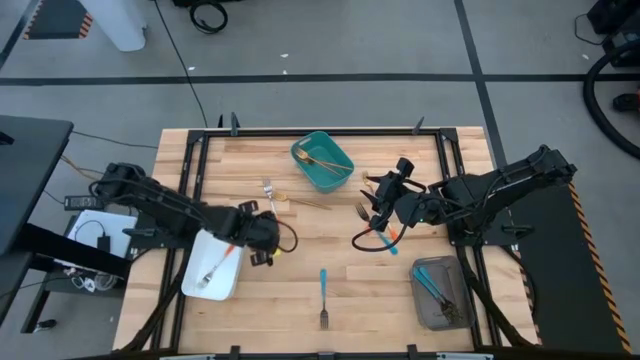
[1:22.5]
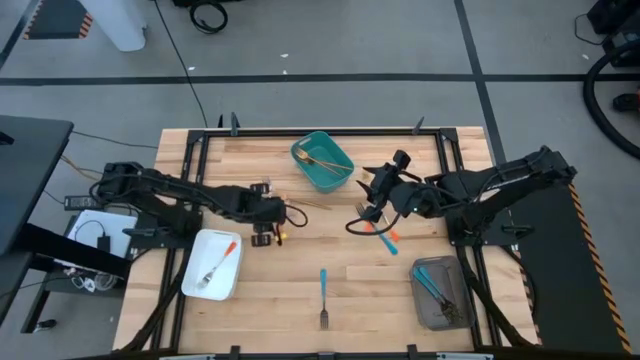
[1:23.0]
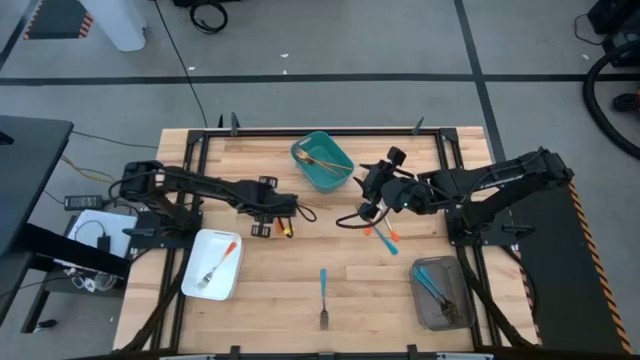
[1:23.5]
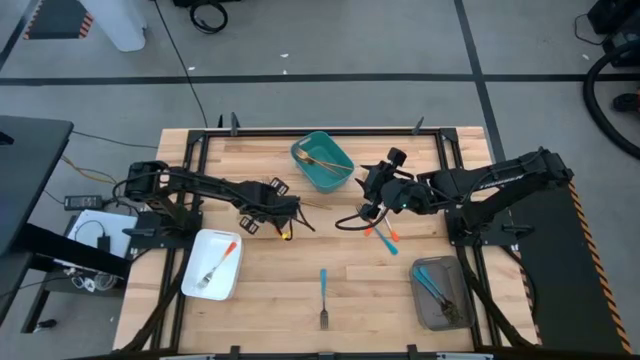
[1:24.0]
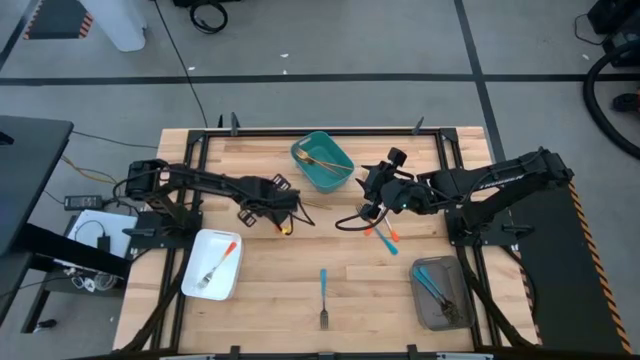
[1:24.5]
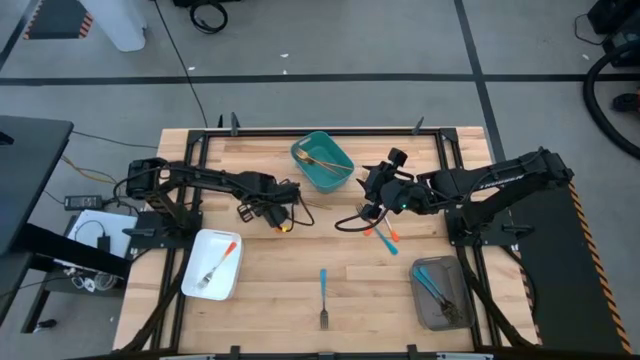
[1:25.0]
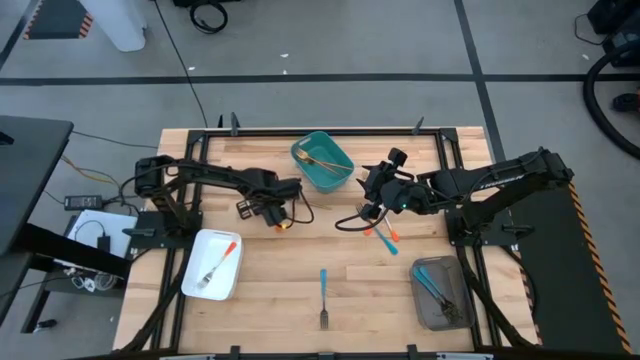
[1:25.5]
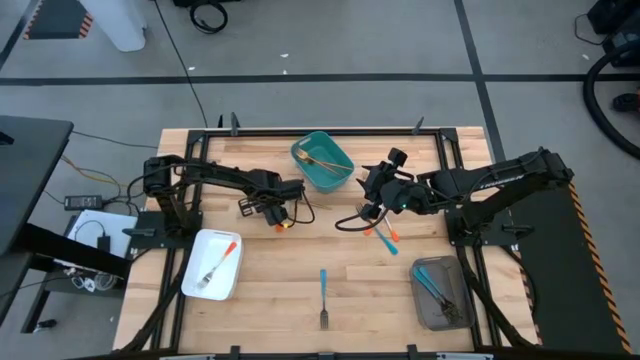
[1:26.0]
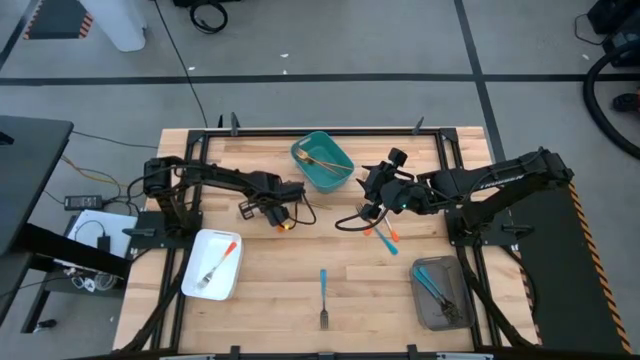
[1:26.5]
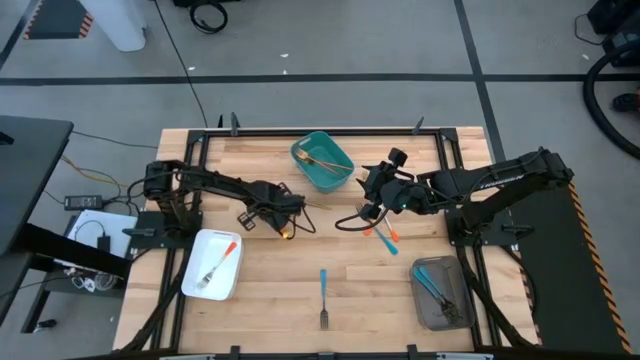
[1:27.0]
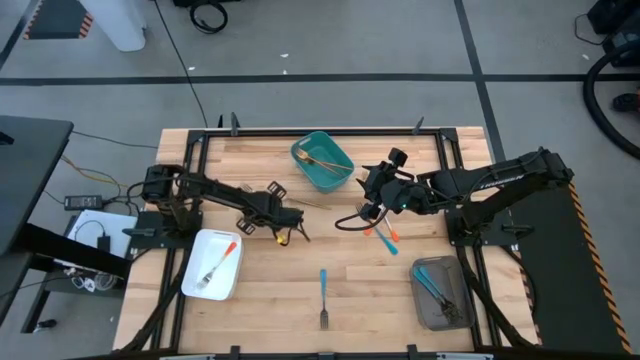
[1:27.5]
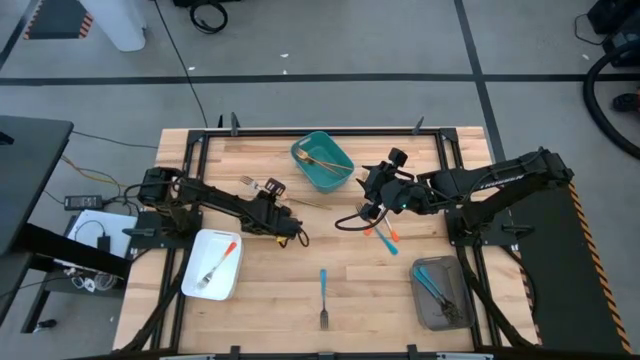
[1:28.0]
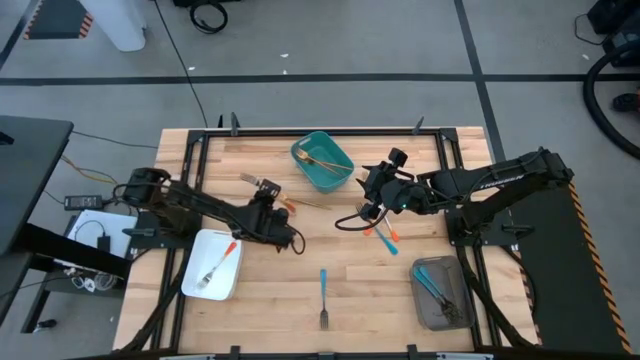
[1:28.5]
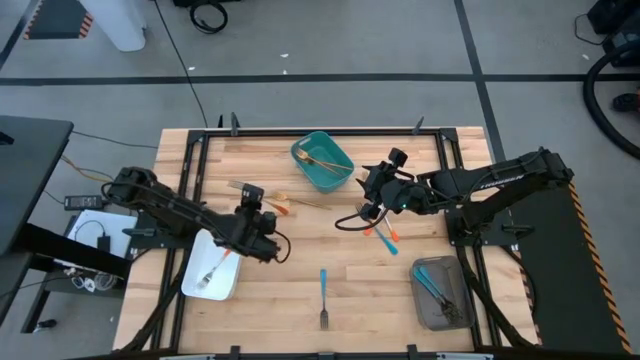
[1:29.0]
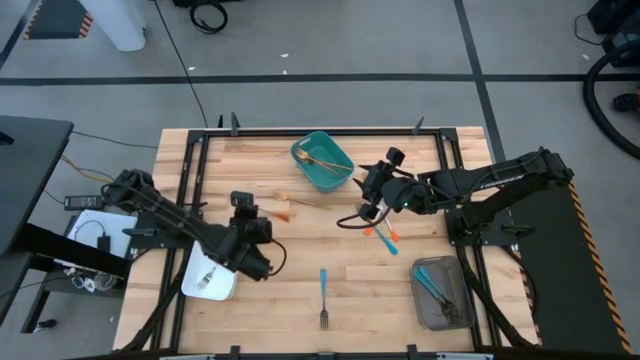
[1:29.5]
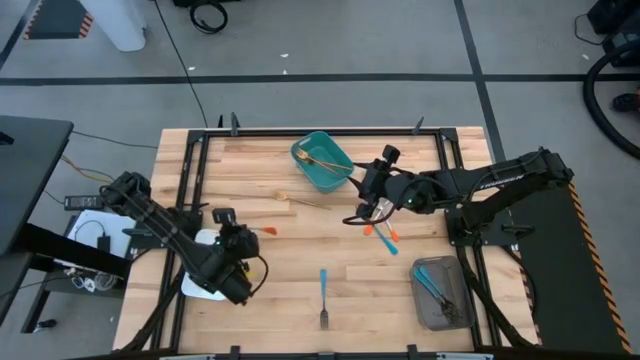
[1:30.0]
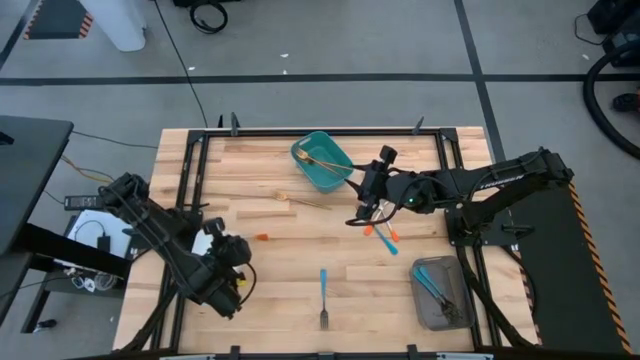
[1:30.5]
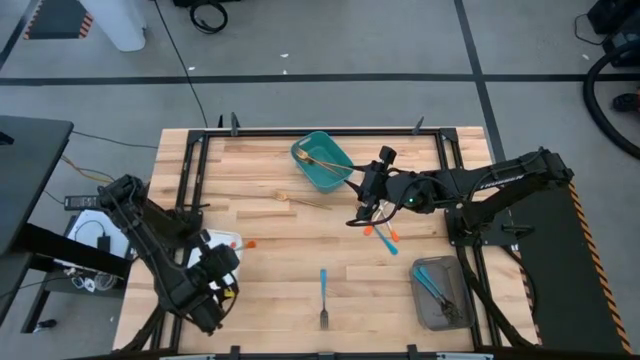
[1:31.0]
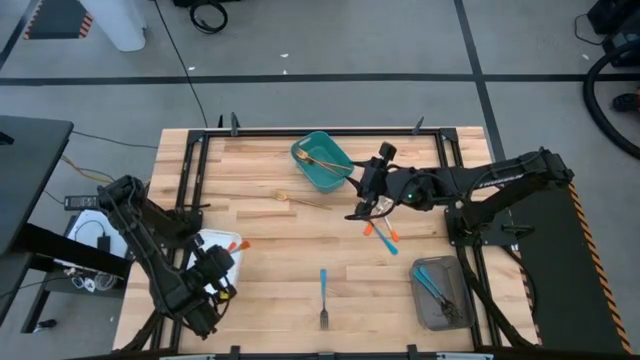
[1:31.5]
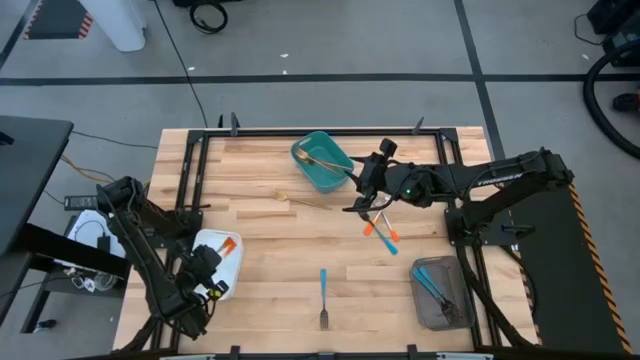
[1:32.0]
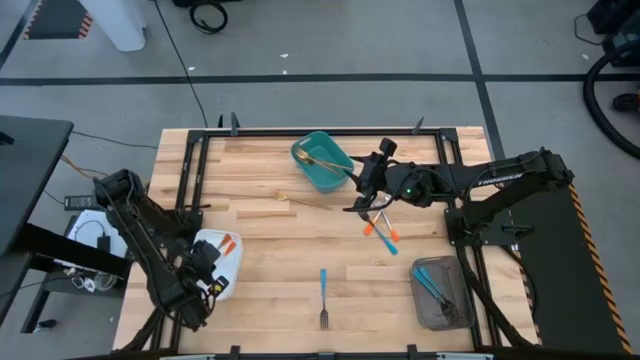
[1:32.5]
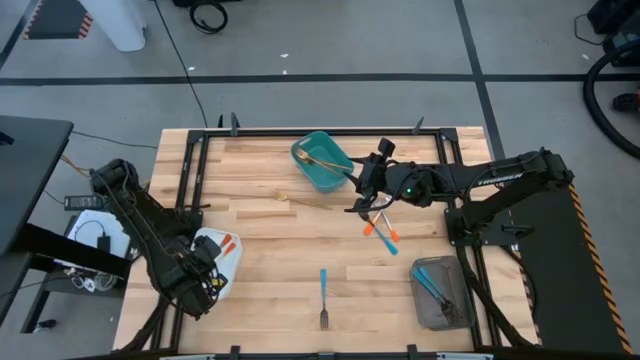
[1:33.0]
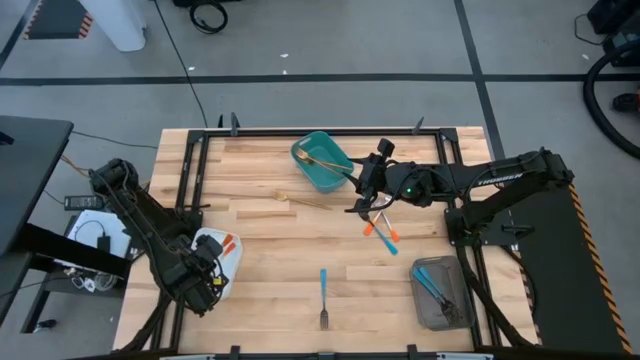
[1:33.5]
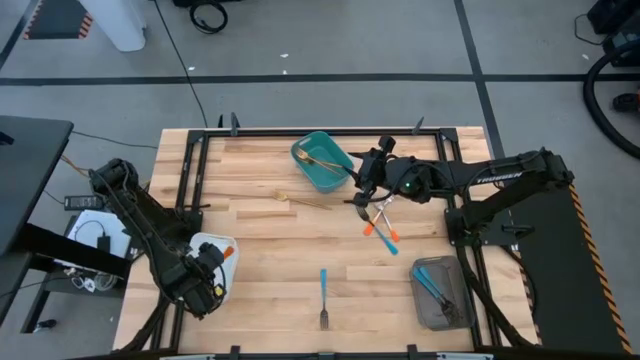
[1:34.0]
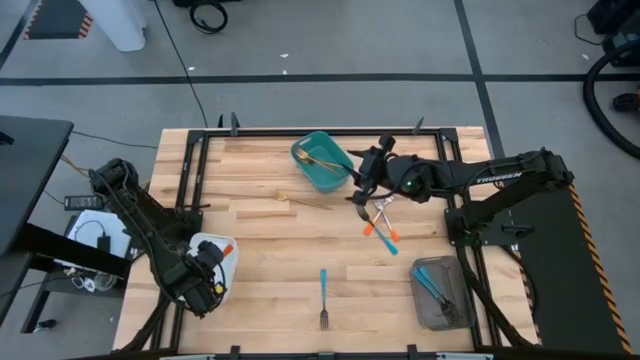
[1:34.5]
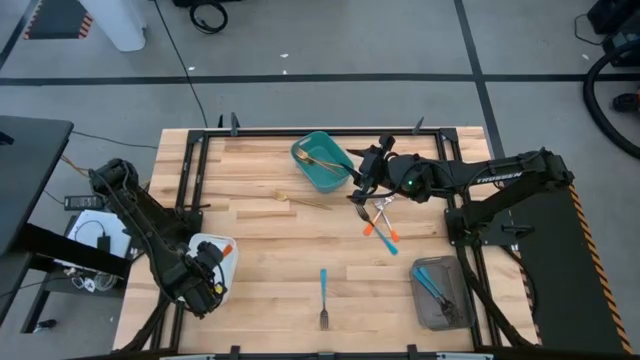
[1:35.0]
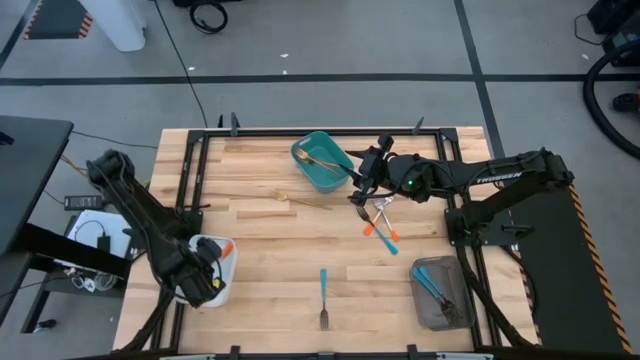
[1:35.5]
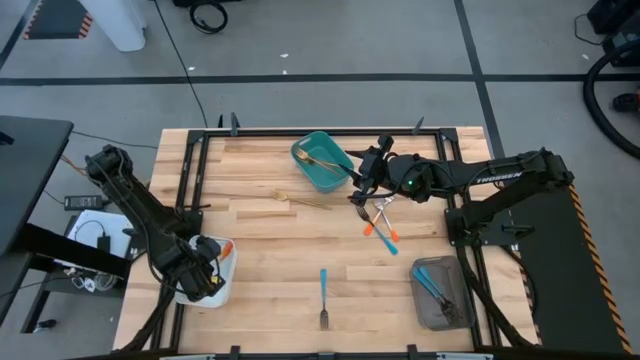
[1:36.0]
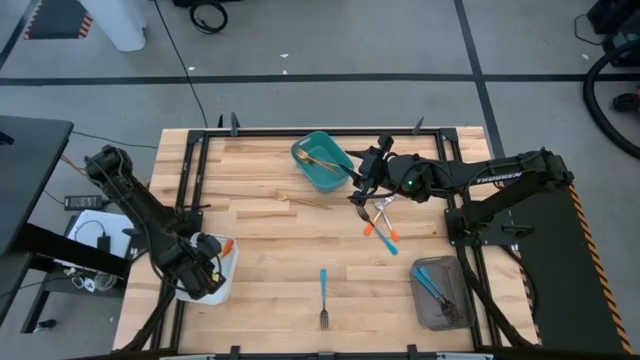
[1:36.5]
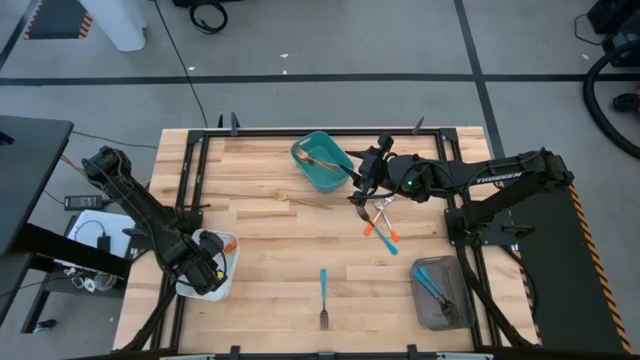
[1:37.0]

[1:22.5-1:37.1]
Task: Sort silverware by color (type)
Put the orange fork into the white bin

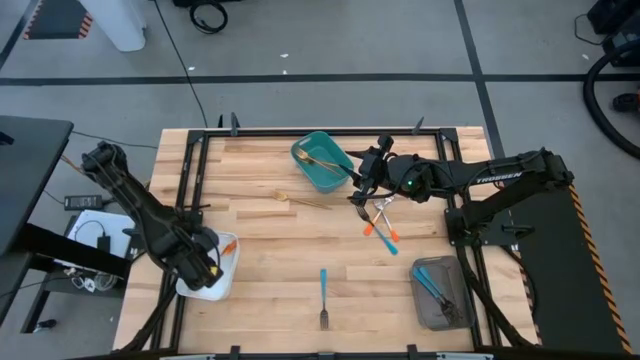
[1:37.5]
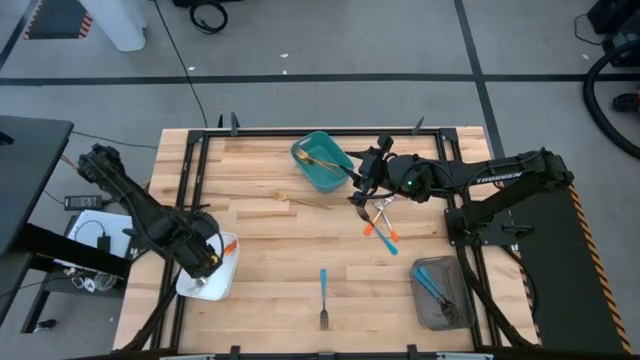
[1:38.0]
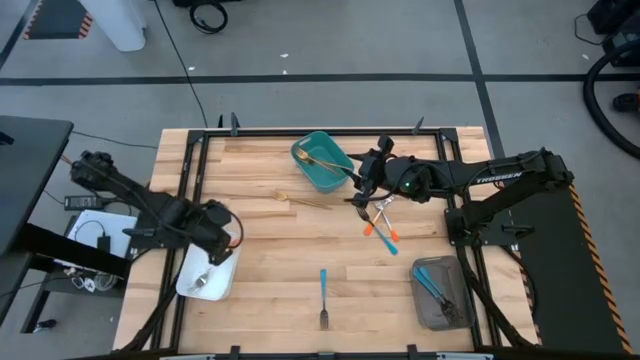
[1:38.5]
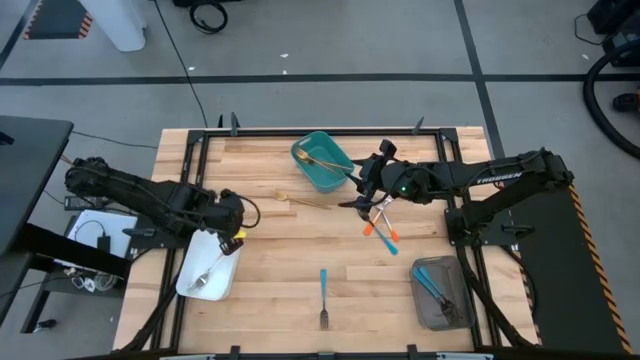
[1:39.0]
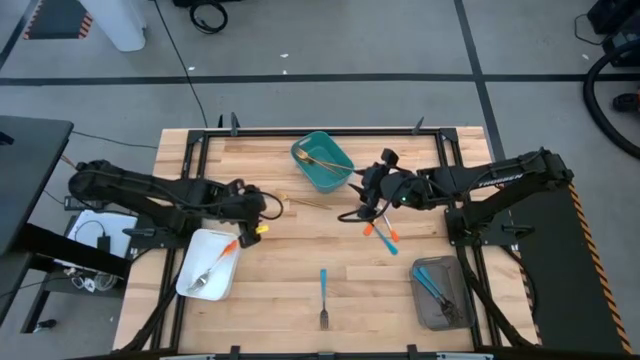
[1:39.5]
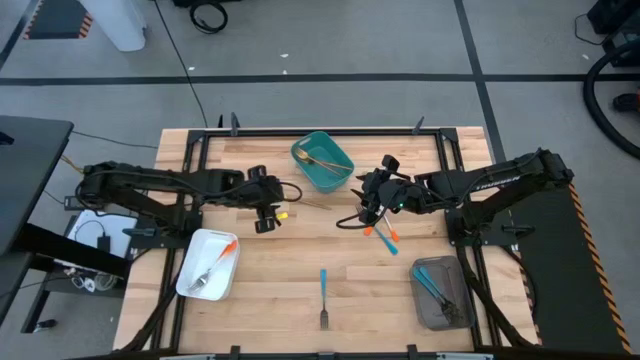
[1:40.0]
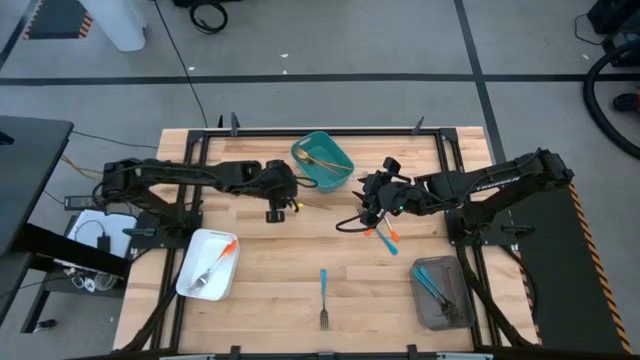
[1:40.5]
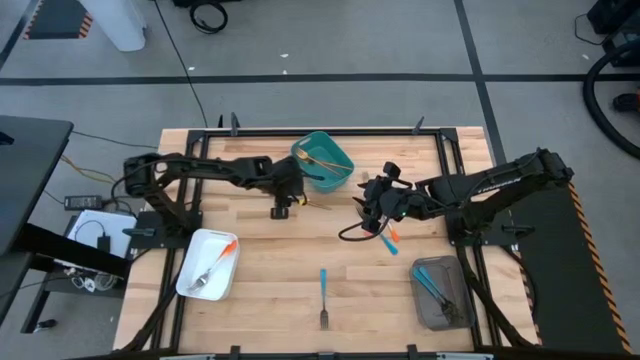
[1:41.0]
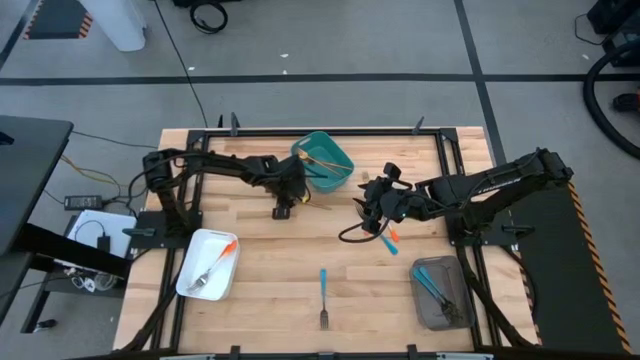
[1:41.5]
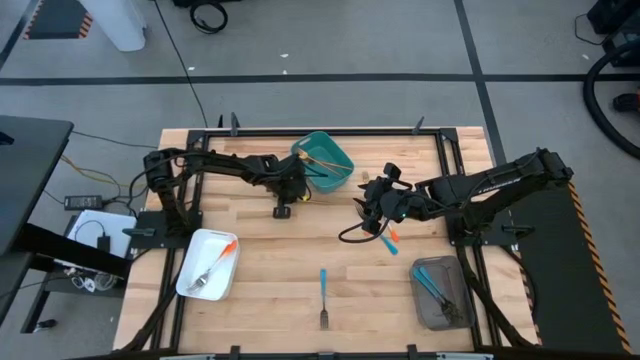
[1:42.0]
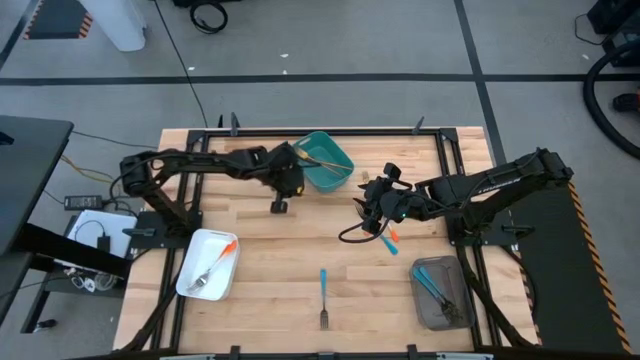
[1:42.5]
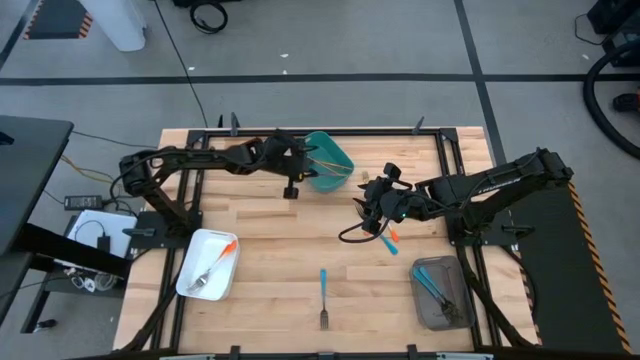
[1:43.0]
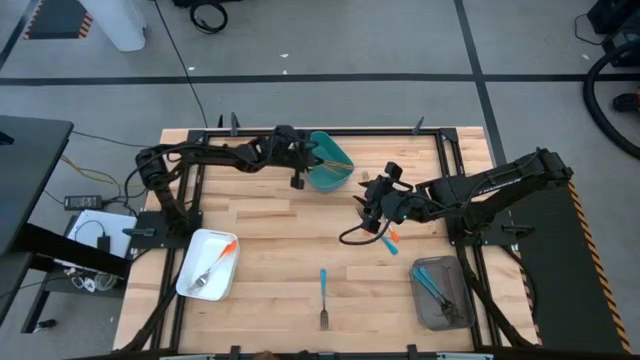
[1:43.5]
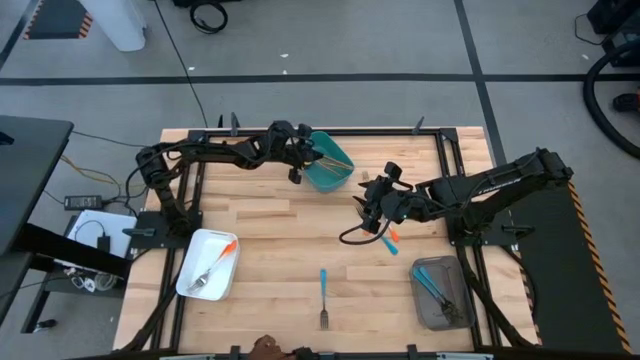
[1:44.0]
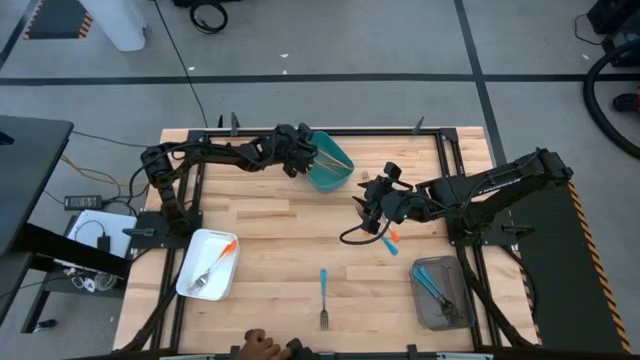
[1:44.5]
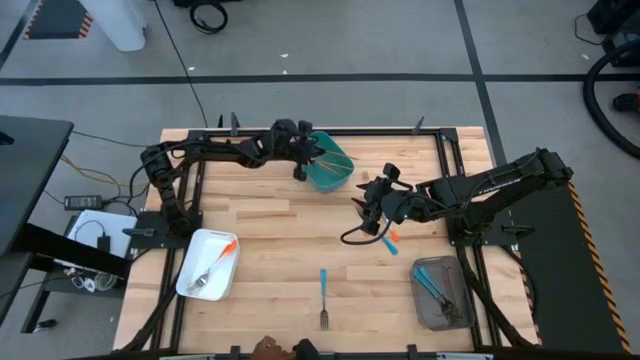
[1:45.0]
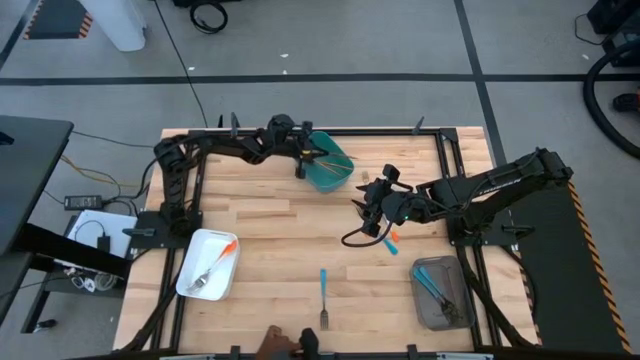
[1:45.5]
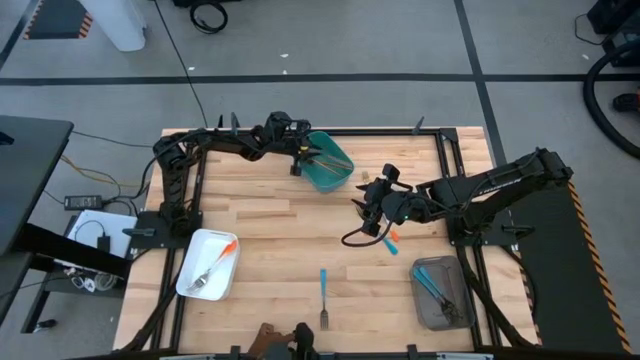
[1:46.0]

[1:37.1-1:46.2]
Put the gold fork into the green bin
